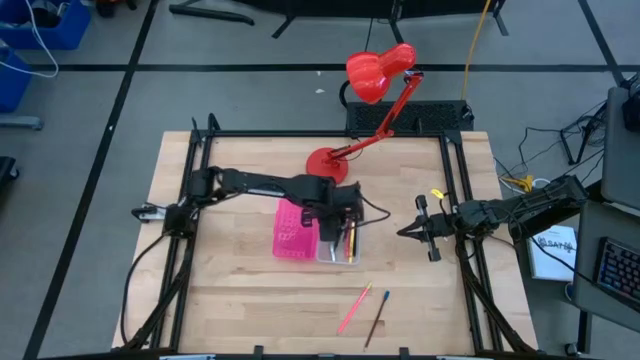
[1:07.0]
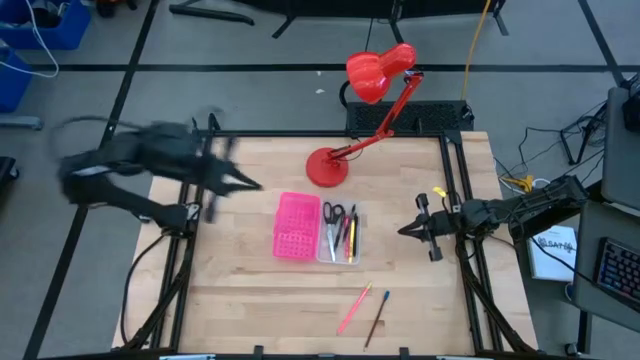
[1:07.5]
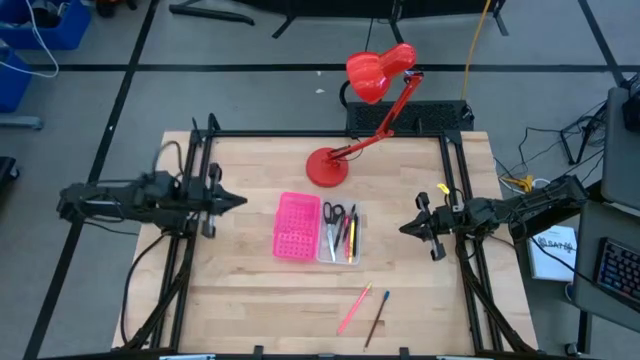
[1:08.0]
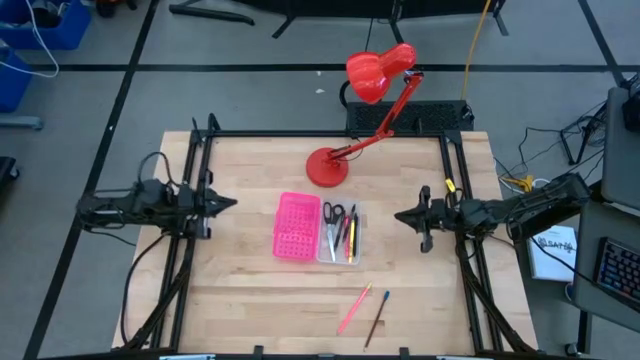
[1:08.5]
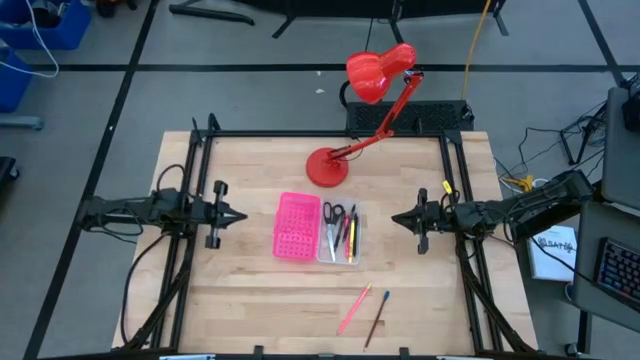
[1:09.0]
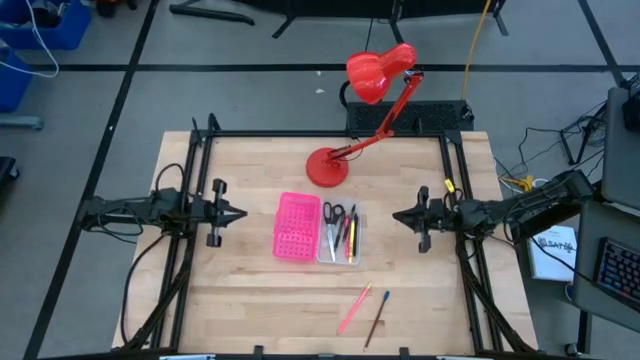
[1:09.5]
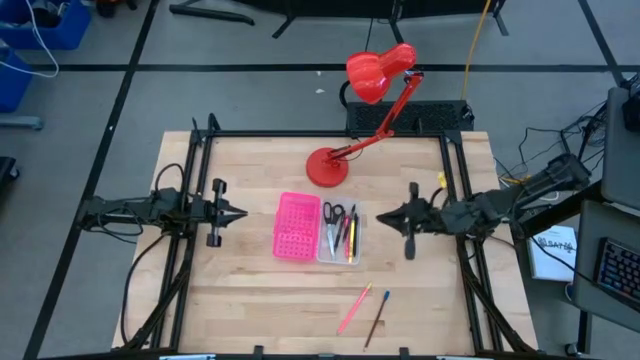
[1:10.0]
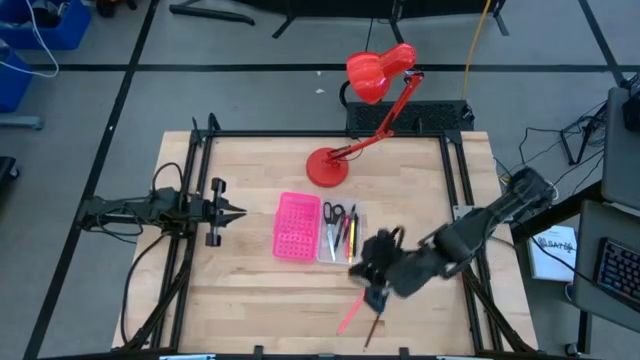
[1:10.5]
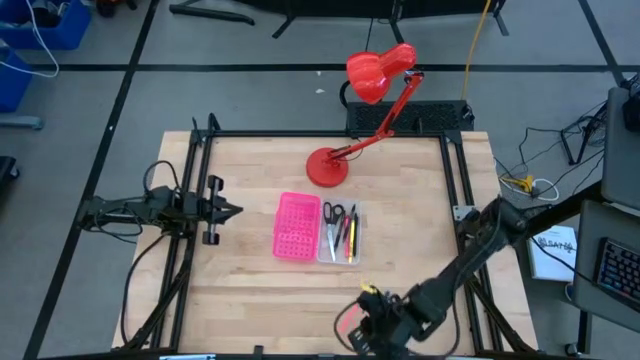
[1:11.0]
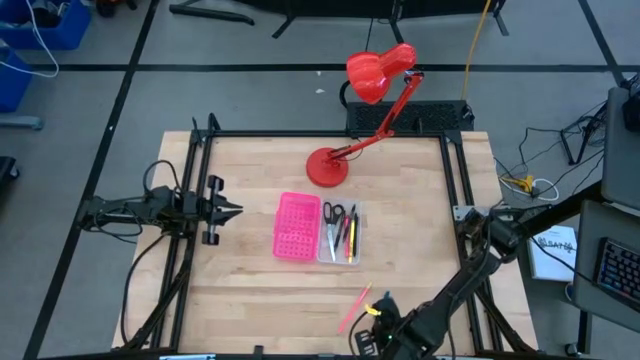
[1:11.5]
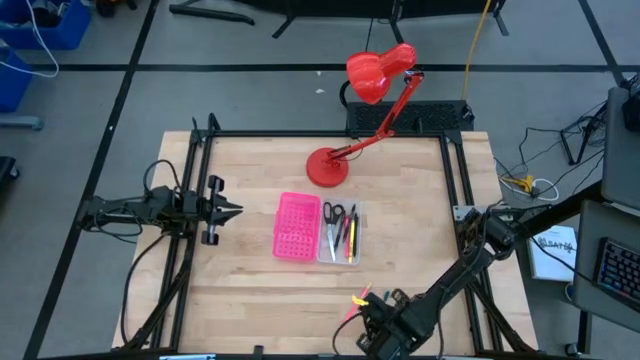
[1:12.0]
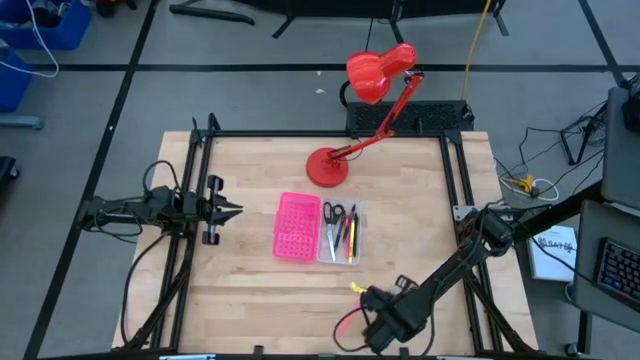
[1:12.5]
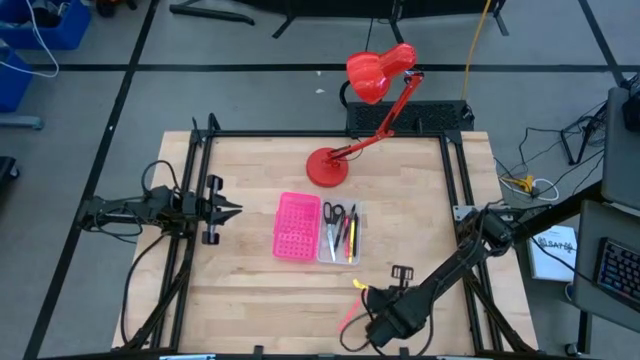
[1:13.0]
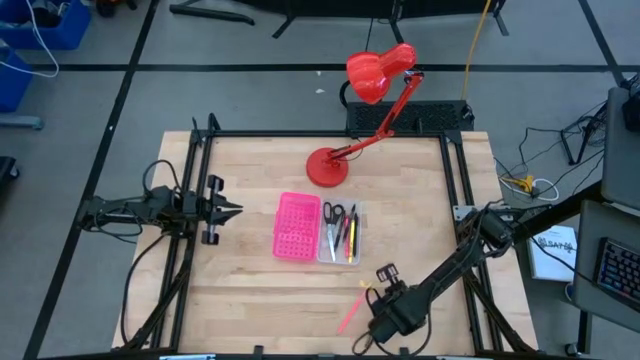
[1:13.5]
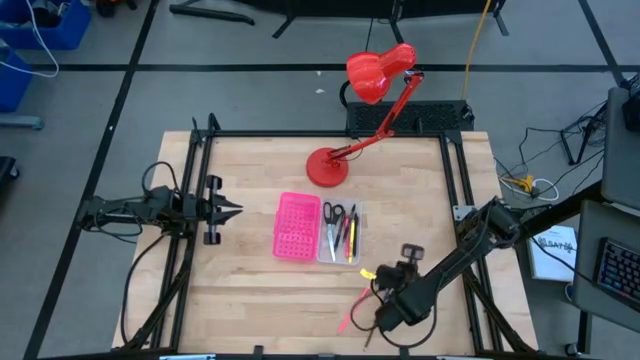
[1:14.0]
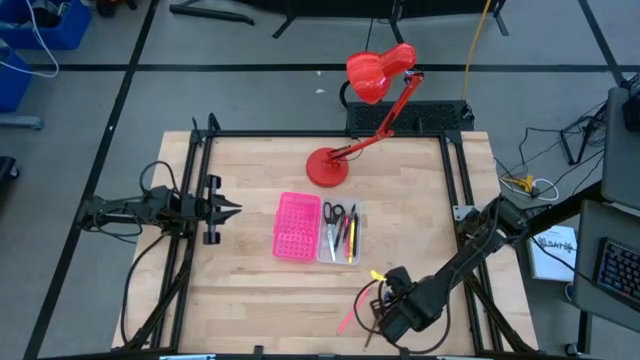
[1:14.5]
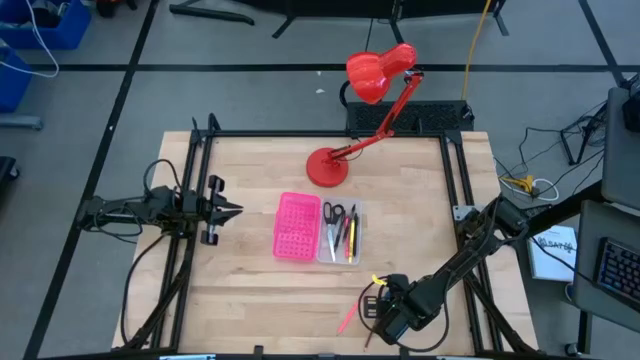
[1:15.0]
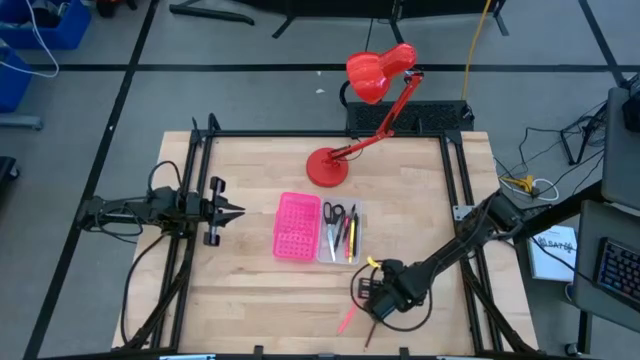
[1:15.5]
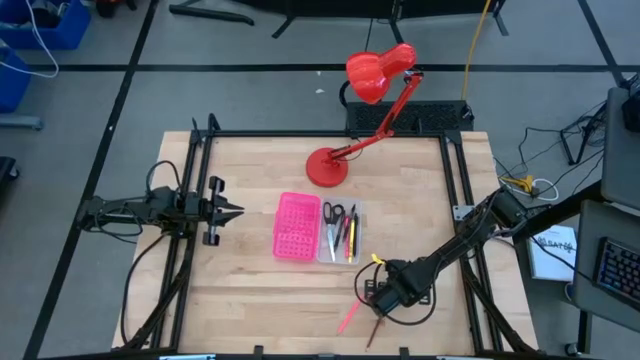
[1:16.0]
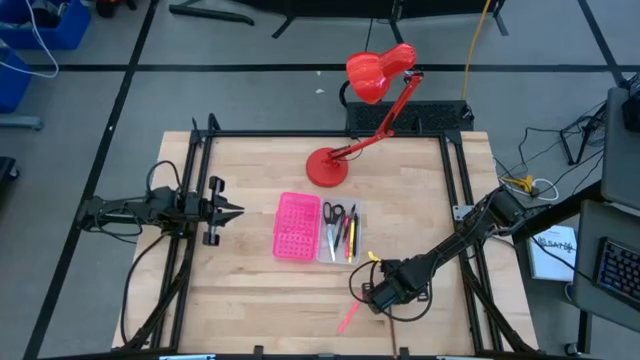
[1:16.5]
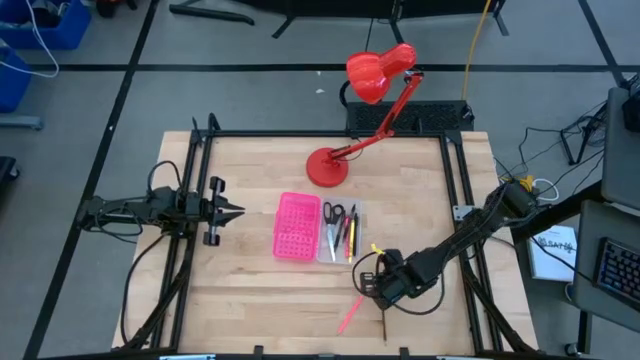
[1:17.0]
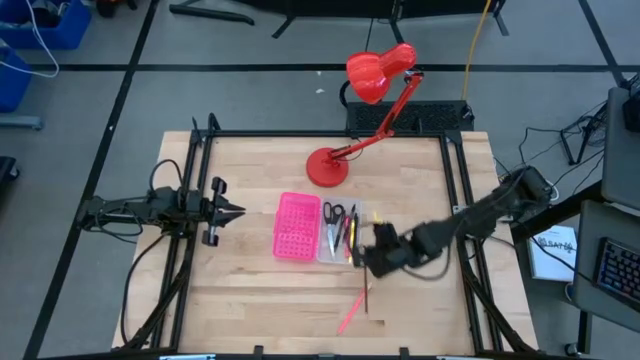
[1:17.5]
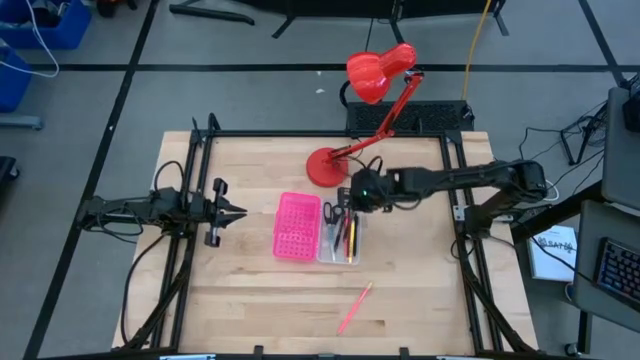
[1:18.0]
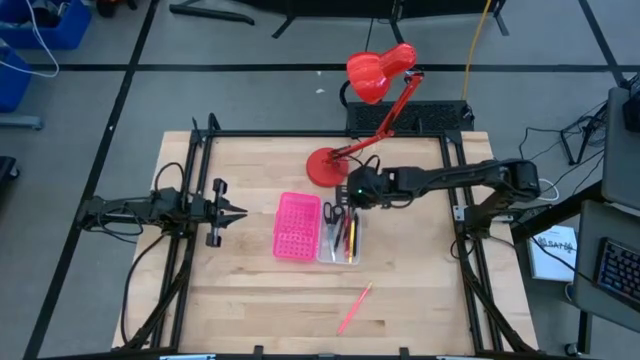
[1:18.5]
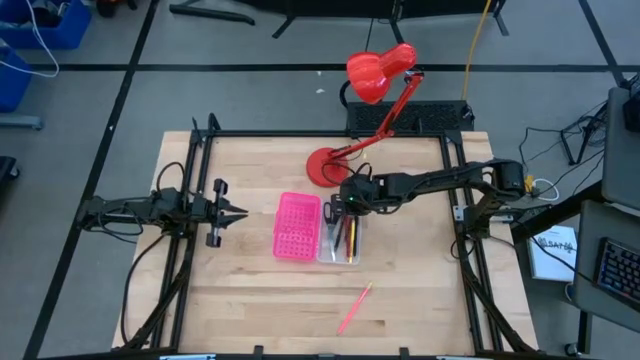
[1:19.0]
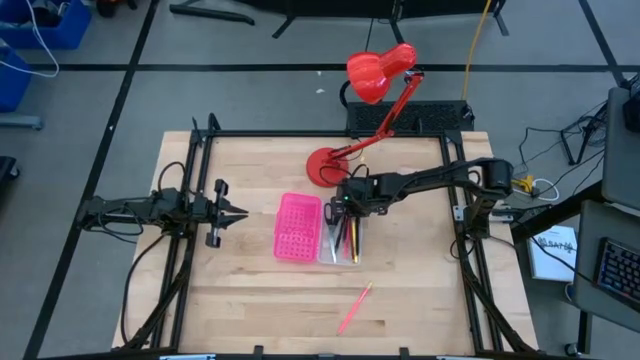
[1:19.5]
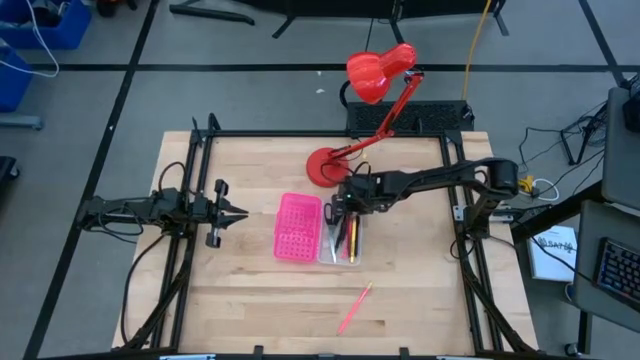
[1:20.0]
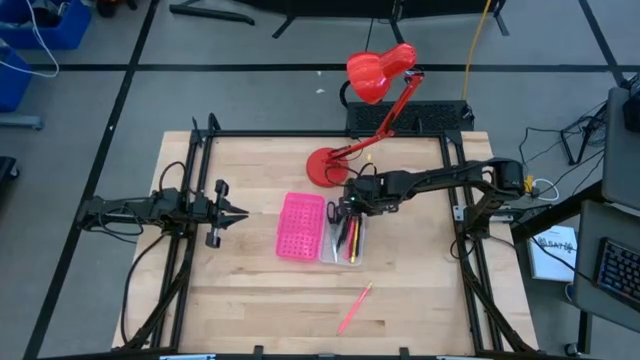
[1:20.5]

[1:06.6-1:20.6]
Task: Pick & place school supplies into a supply box
Put the brown pencil into the pink supply box

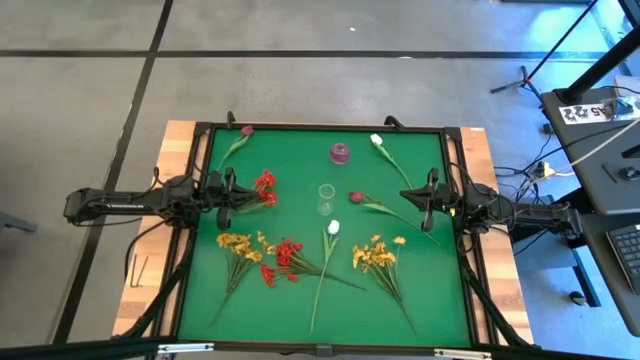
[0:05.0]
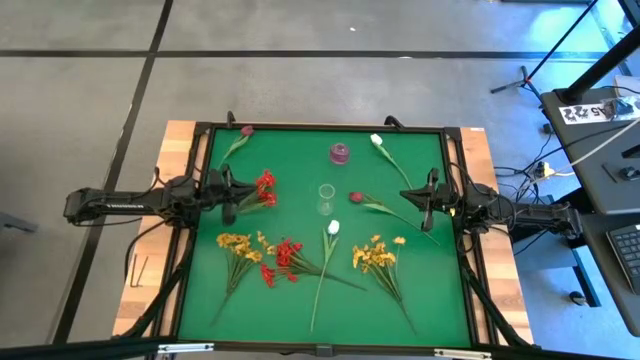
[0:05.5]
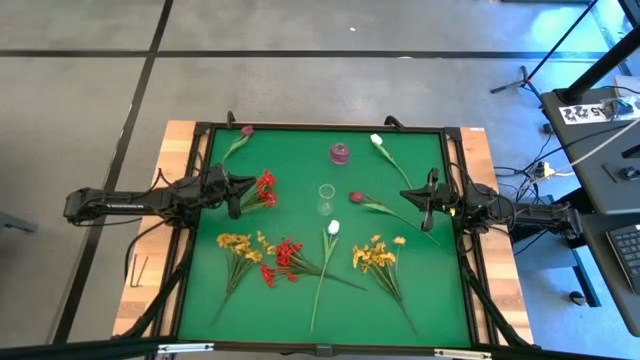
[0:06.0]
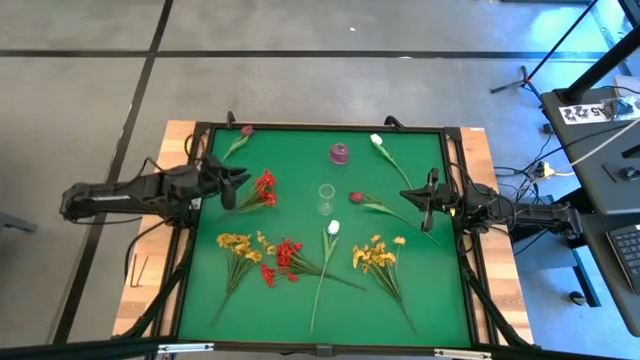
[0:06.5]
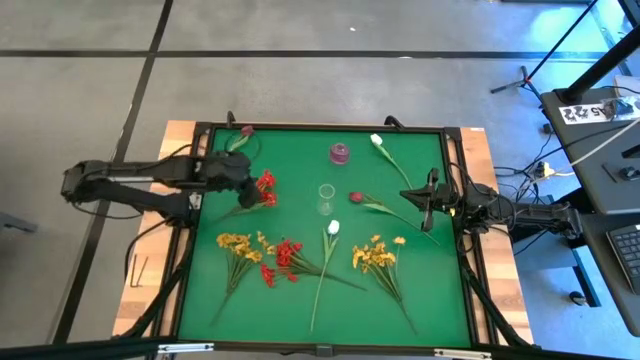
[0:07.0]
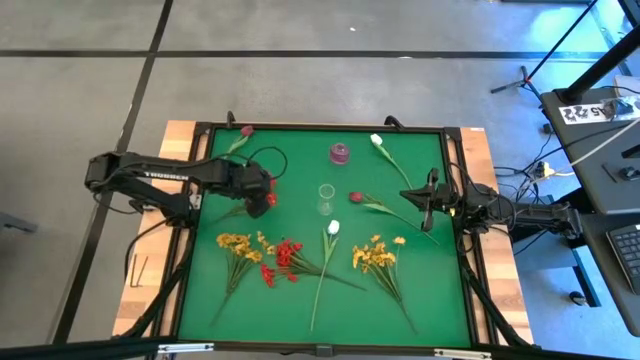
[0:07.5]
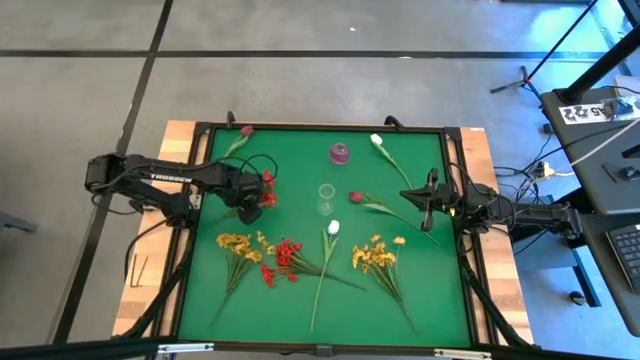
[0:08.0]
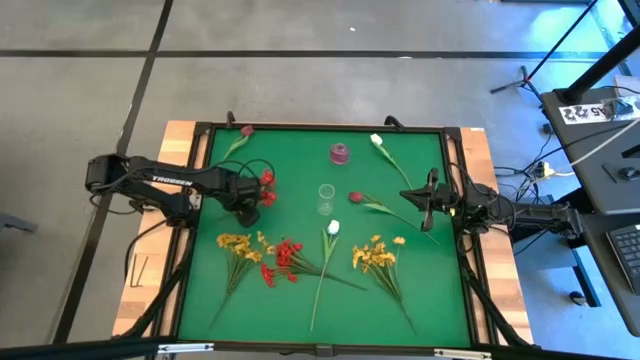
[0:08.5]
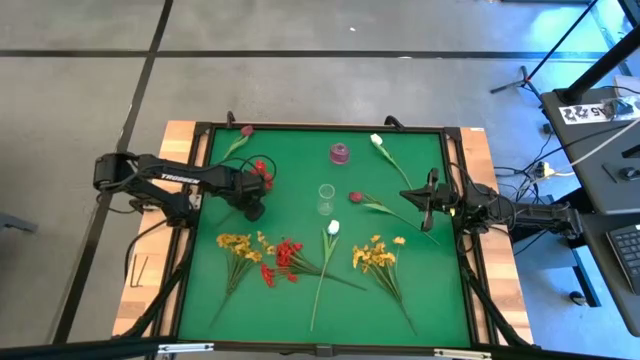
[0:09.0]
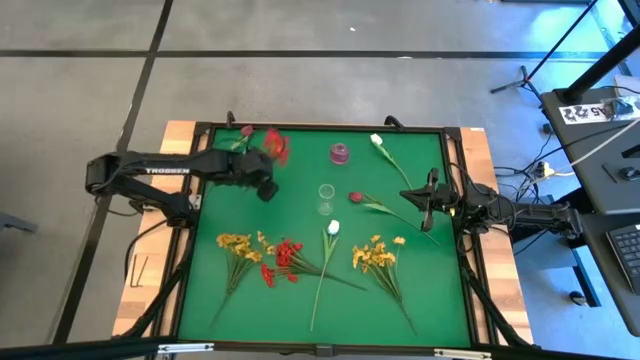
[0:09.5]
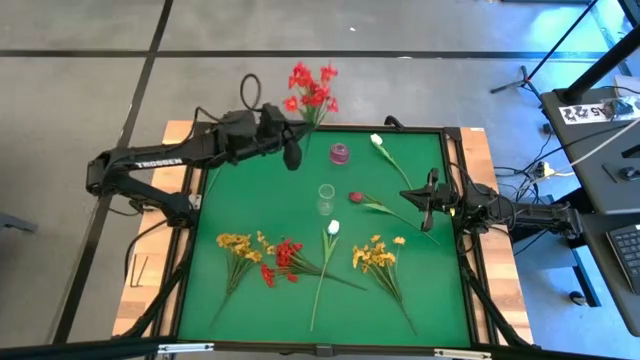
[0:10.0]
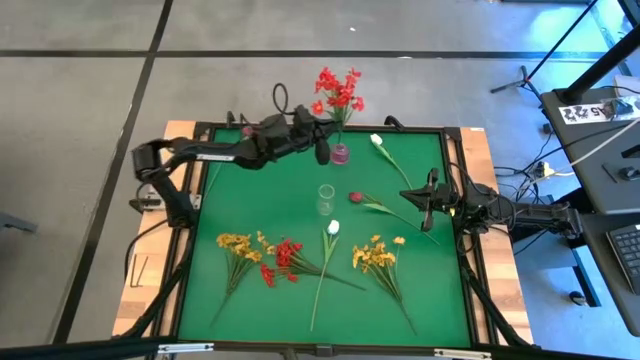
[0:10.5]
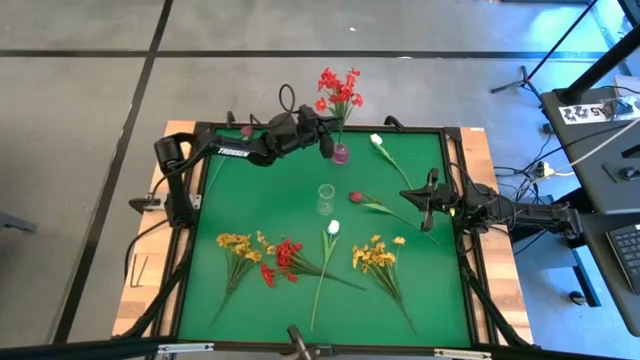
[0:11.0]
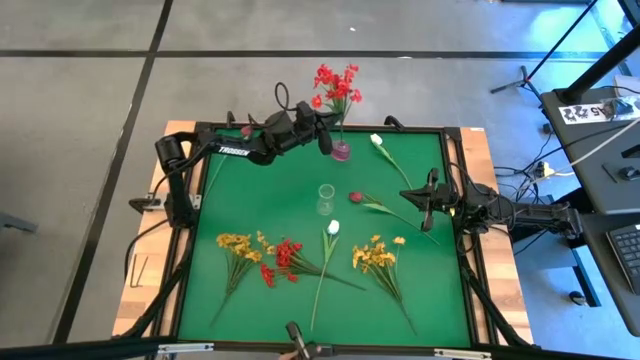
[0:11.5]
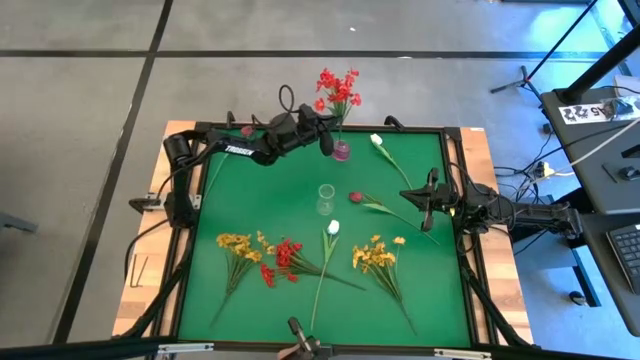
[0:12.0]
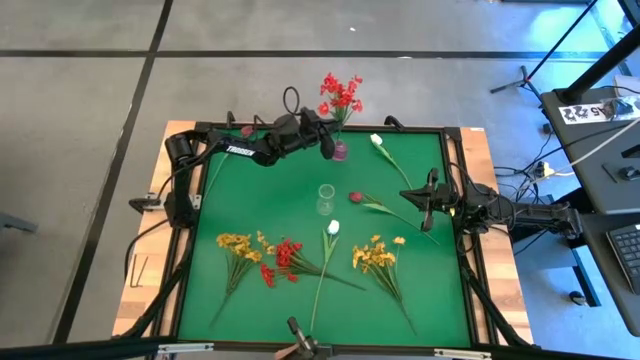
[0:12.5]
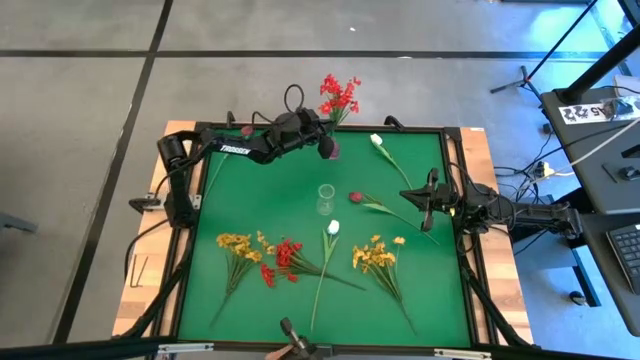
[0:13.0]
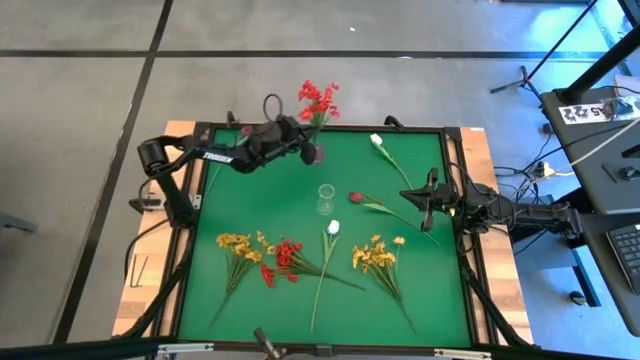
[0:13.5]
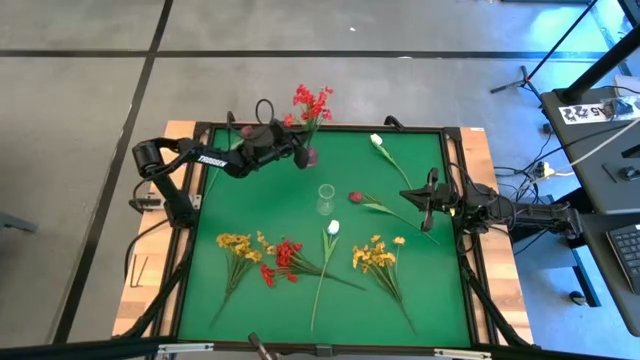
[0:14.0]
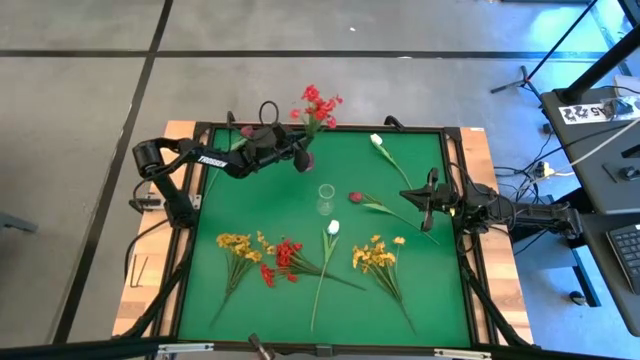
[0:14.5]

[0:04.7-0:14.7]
Task: Sort flowers into vase by color
Put the top red flowers into the purple vase
